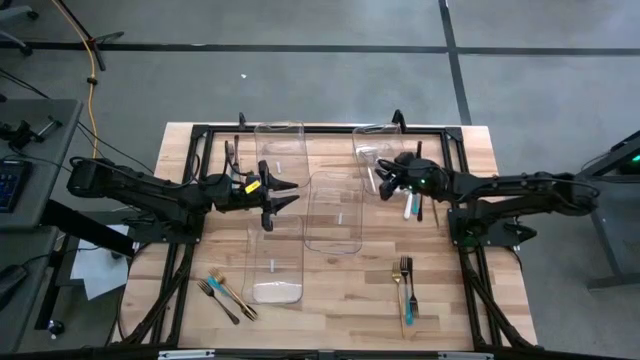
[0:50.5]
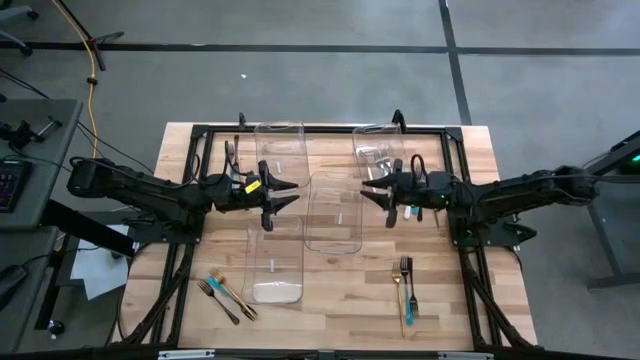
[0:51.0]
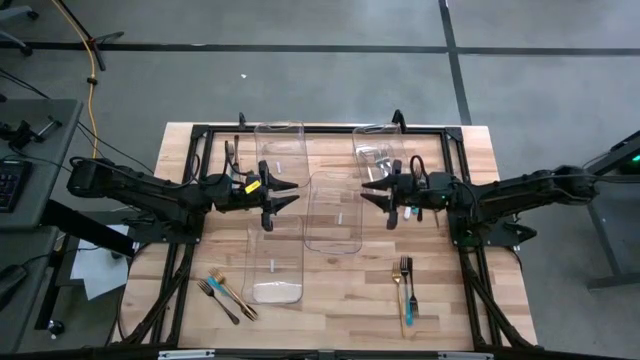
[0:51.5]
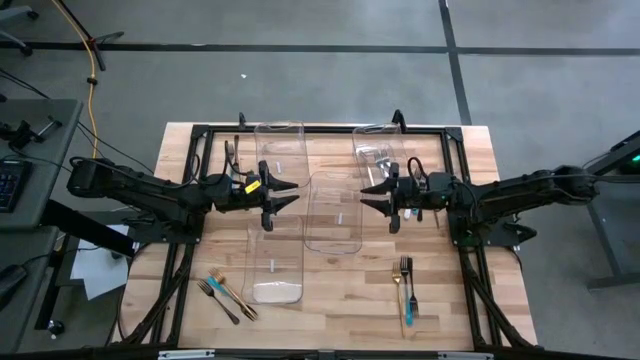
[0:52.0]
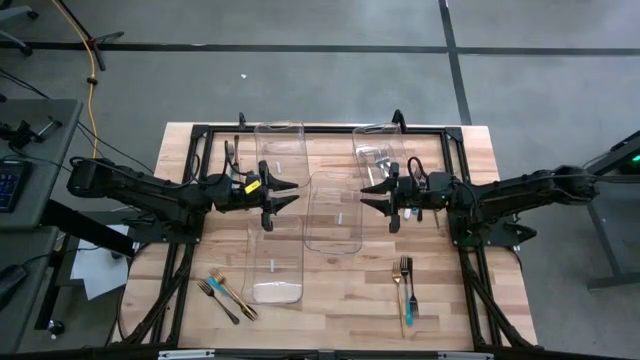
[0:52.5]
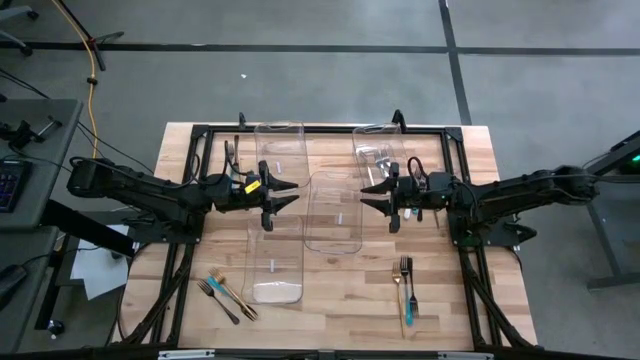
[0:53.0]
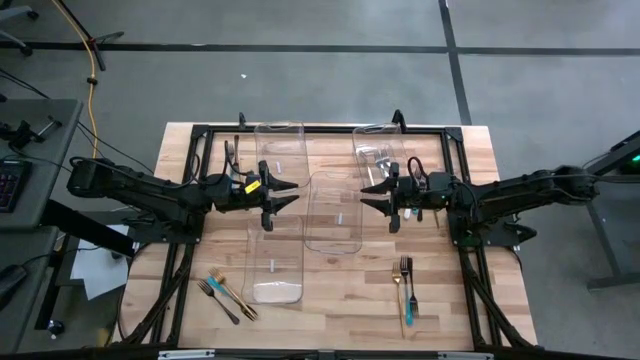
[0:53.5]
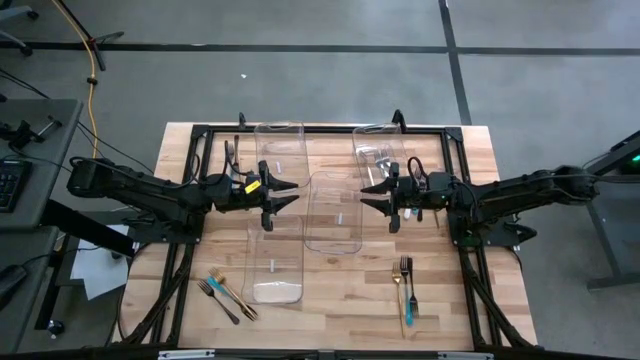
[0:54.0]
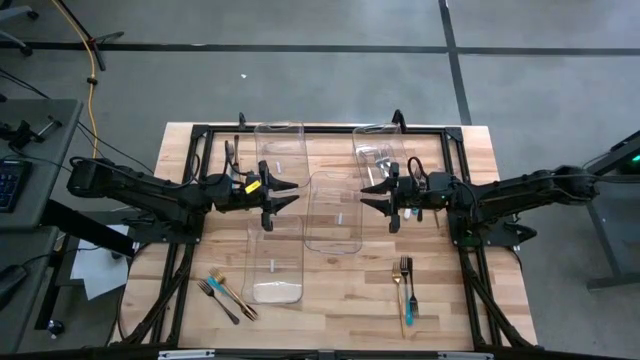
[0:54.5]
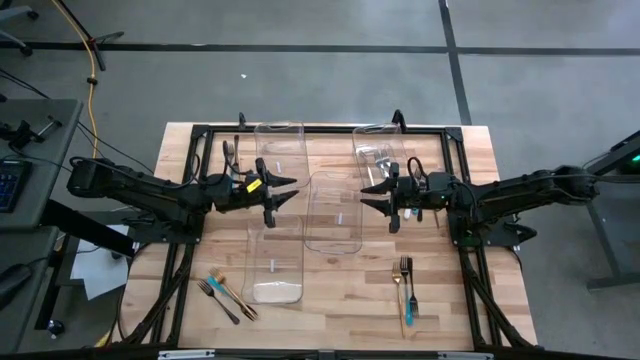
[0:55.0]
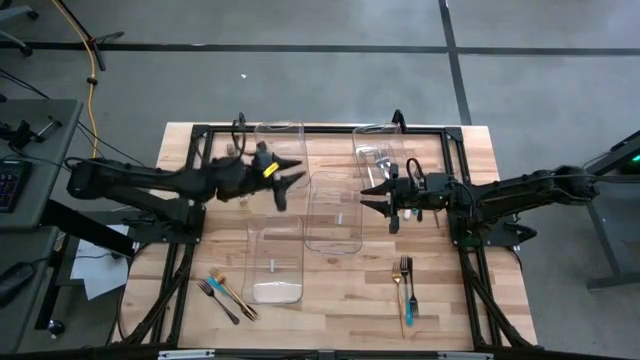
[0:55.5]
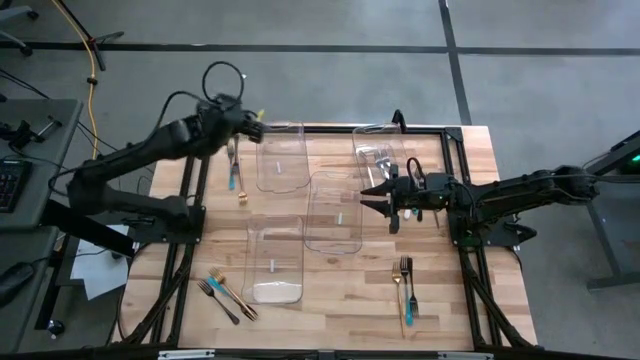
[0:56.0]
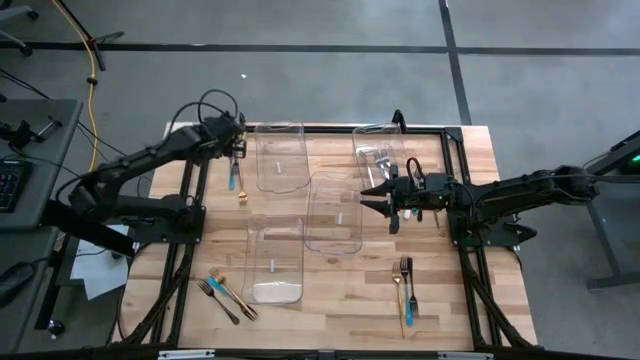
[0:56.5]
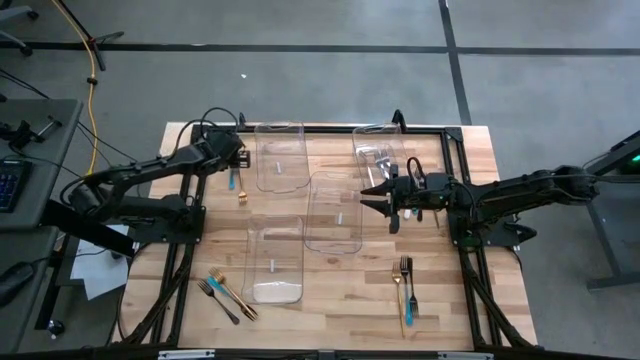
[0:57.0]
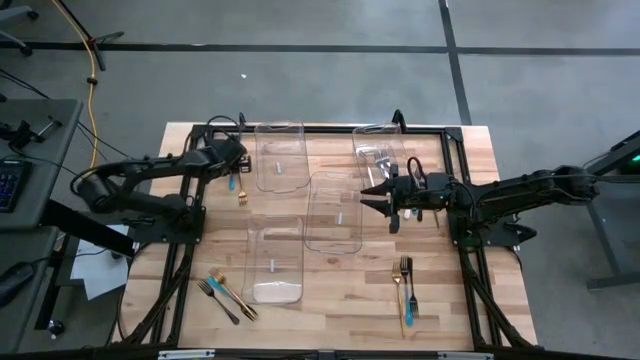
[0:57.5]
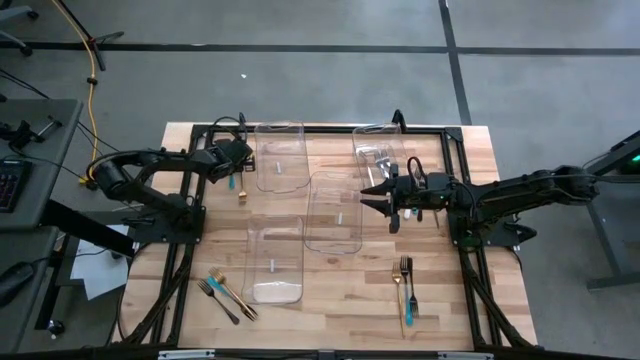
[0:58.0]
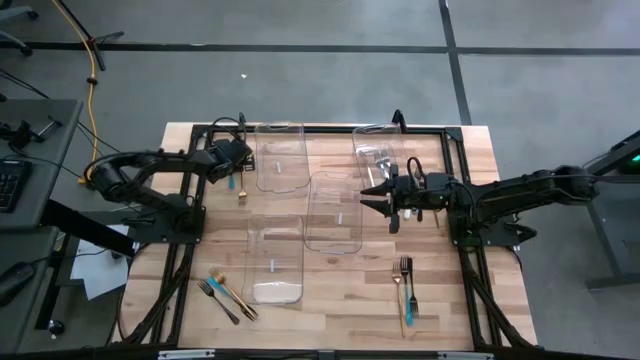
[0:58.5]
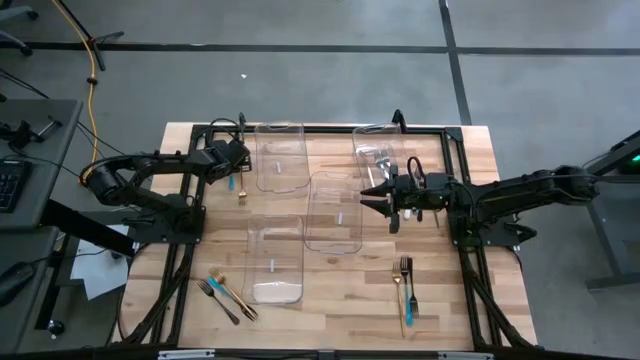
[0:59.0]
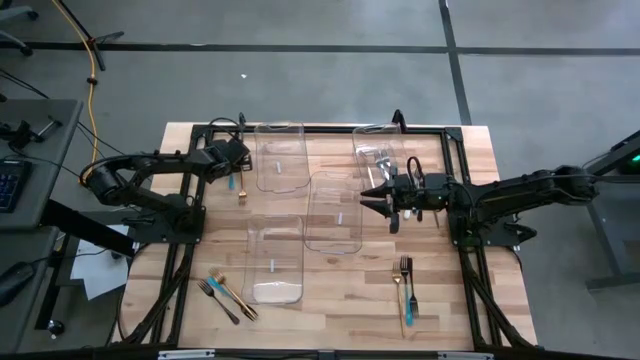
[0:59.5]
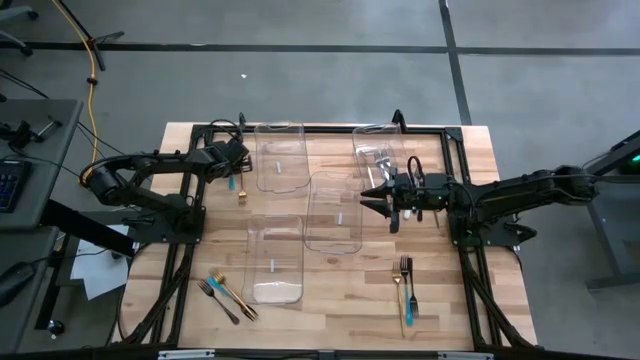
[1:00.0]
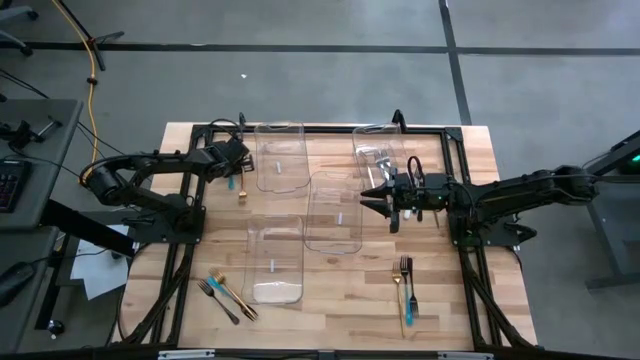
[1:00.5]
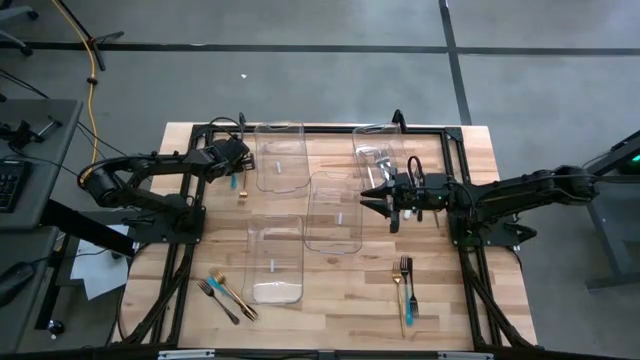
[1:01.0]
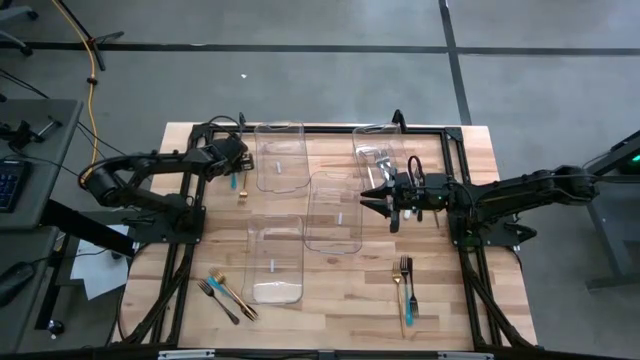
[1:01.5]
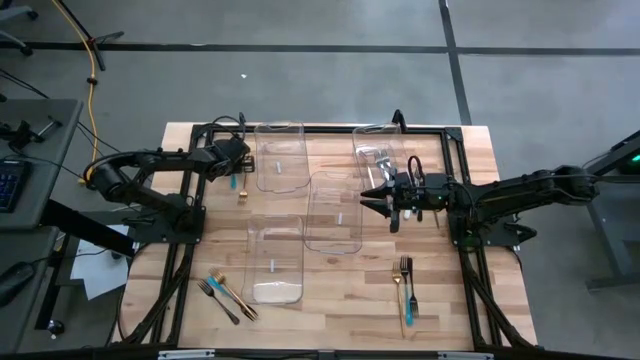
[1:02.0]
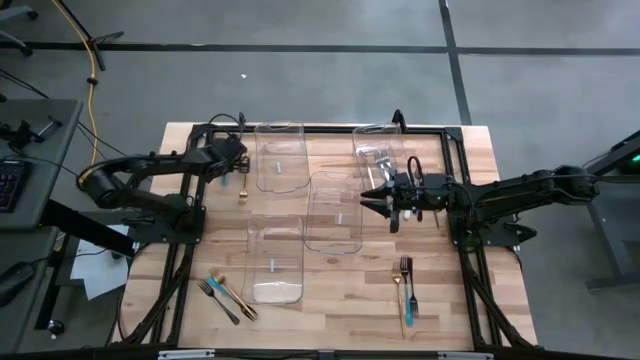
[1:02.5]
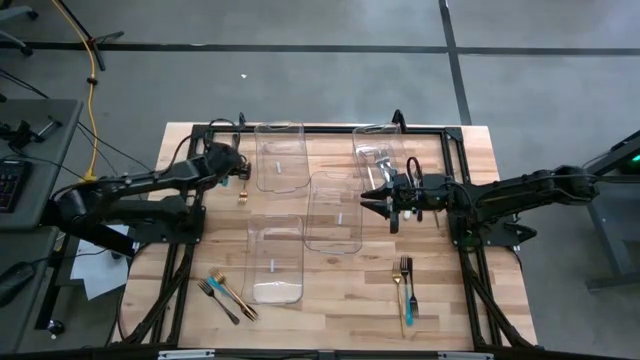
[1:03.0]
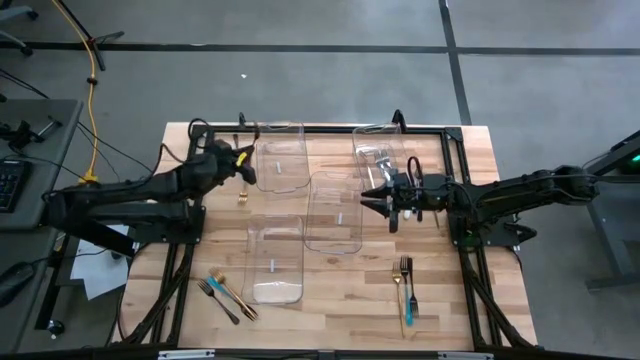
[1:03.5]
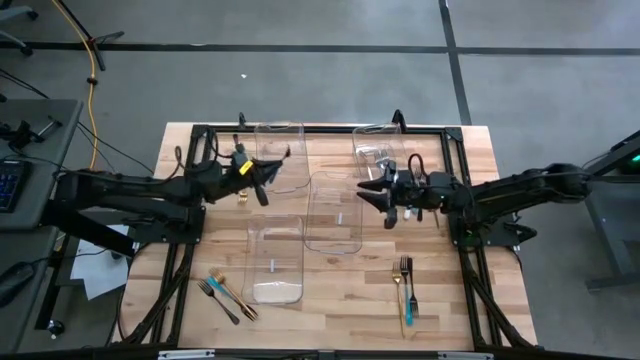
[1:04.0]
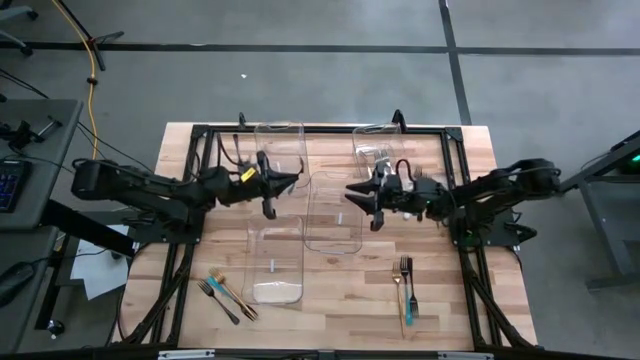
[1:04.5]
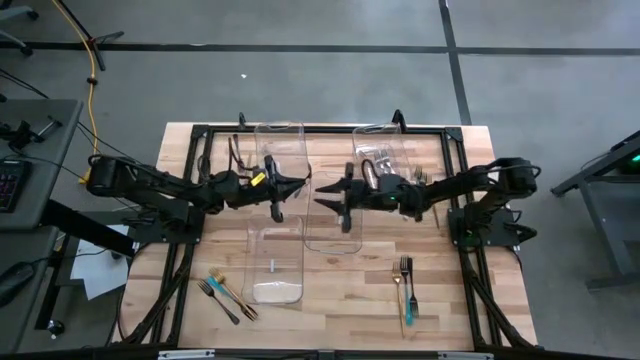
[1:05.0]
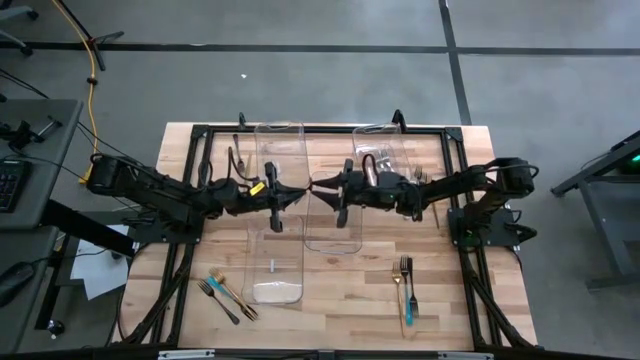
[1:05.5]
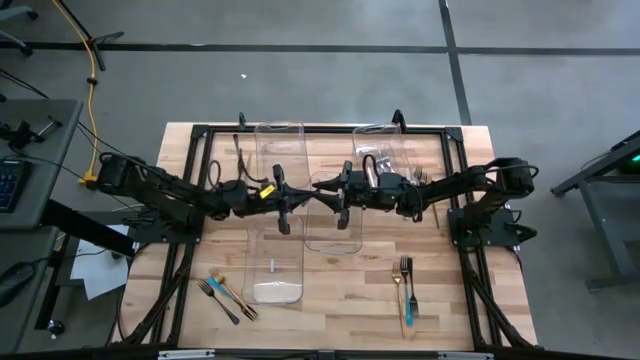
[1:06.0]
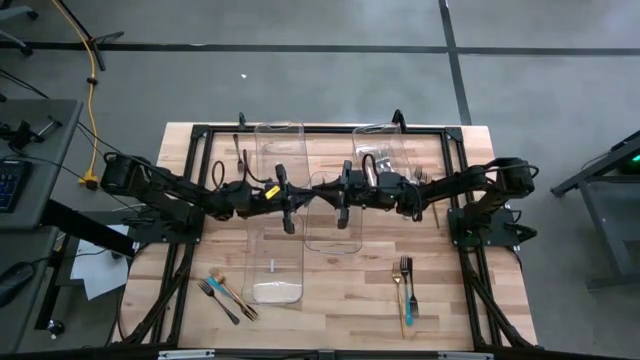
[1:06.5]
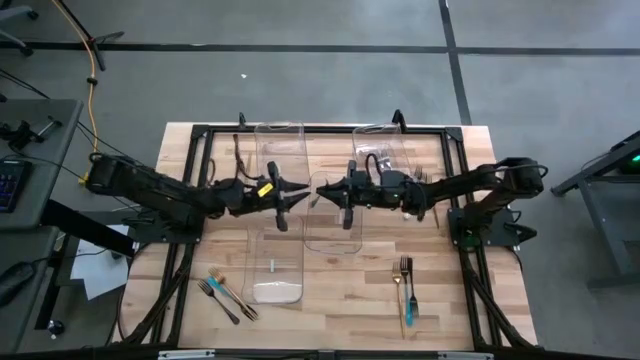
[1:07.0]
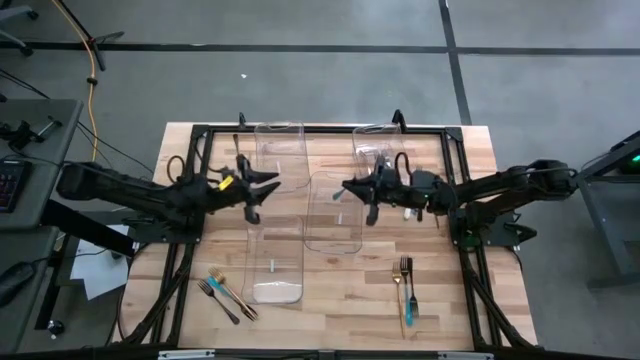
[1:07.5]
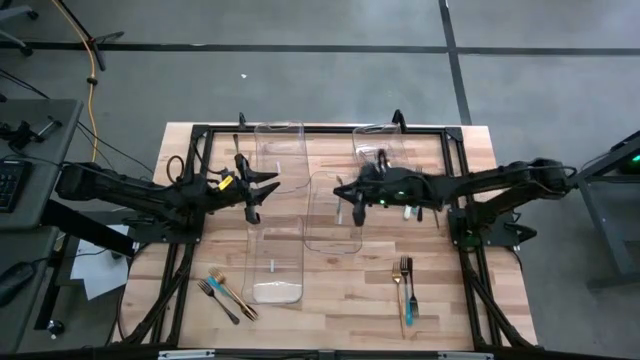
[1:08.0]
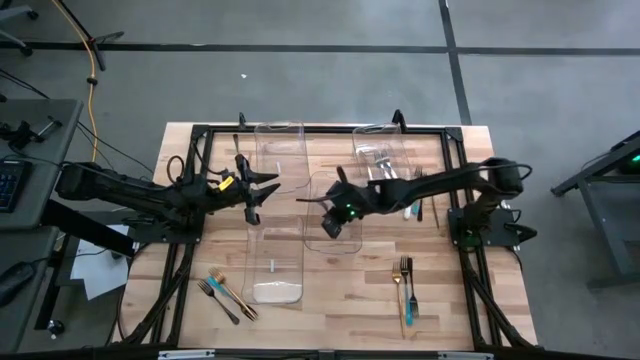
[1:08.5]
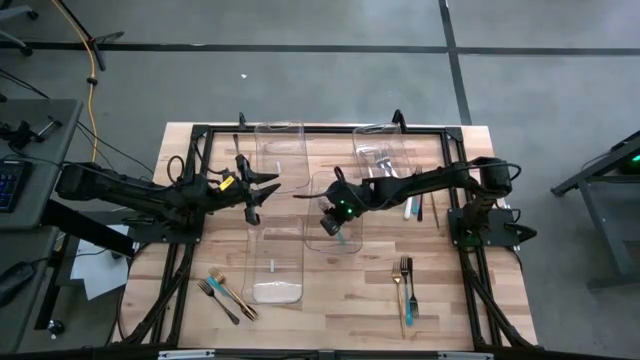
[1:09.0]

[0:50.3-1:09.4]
Task: Sort silverware by color (type)
Put the blue fork into the center transparent bin

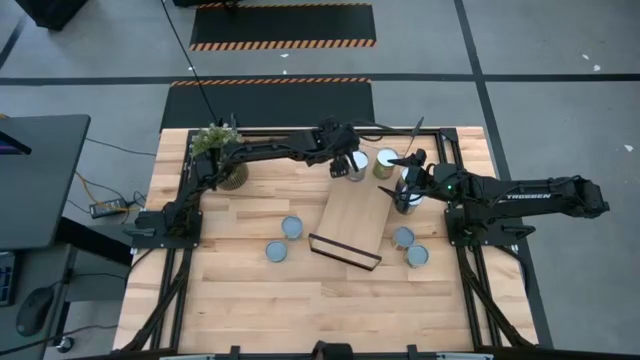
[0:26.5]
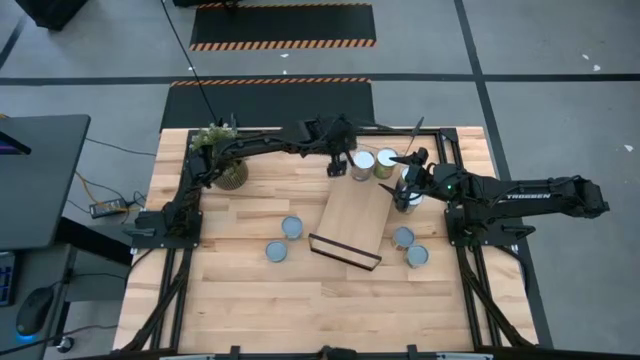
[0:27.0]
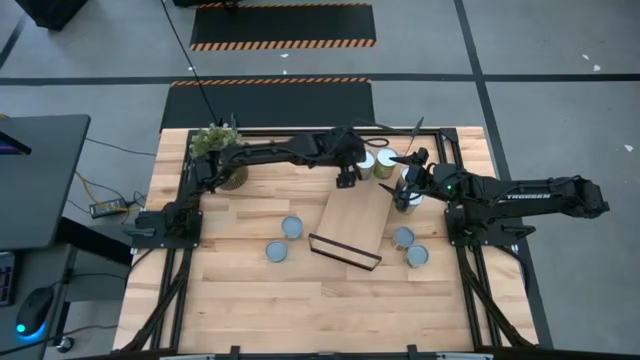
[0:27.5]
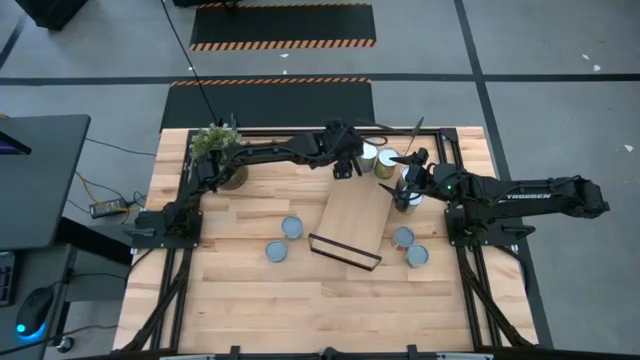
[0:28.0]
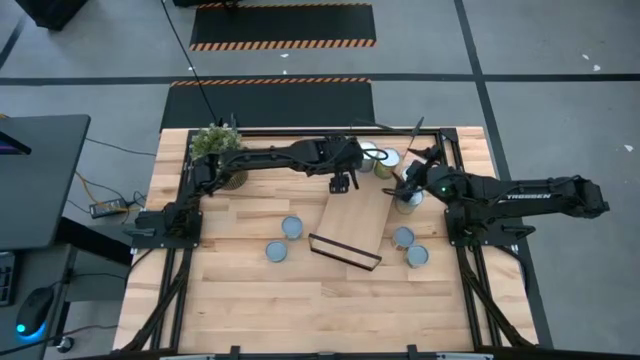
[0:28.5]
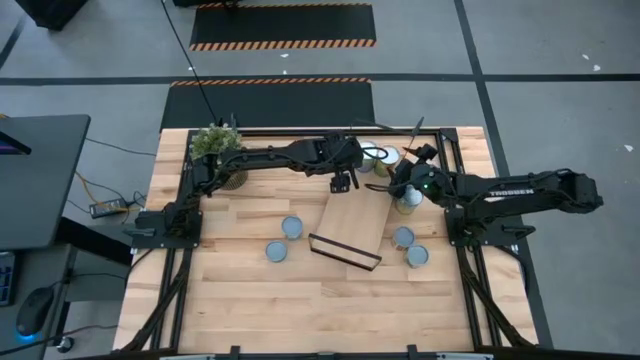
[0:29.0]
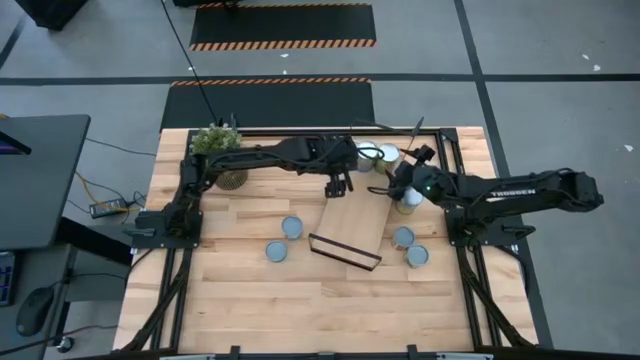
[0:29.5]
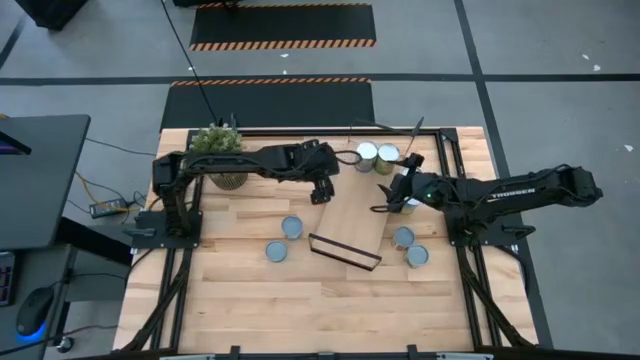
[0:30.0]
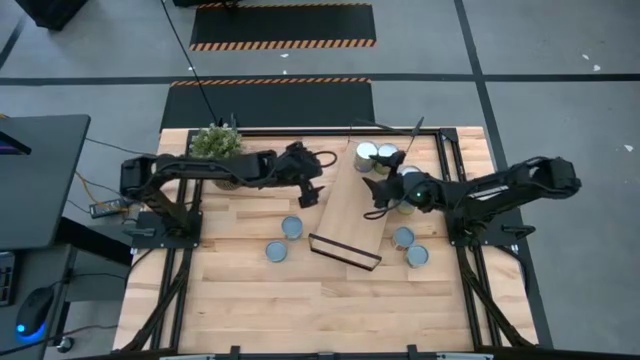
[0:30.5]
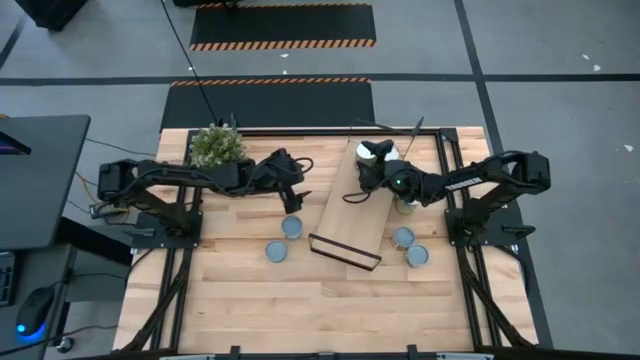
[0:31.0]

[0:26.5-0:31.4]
Task: Pick and place cans onto a shelf
Adjust the canned goods on the shelf
